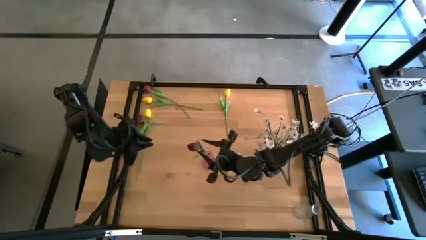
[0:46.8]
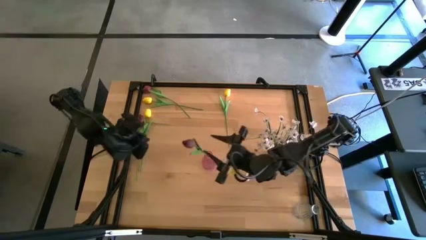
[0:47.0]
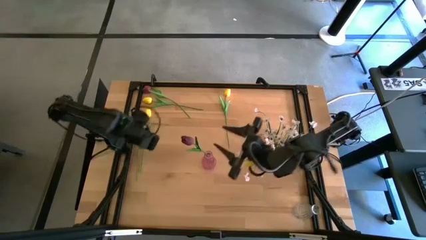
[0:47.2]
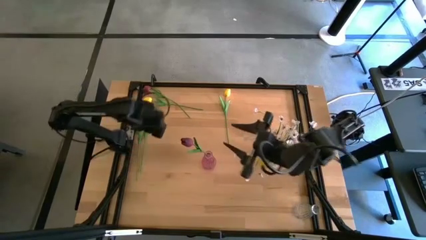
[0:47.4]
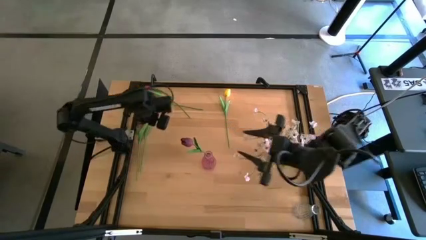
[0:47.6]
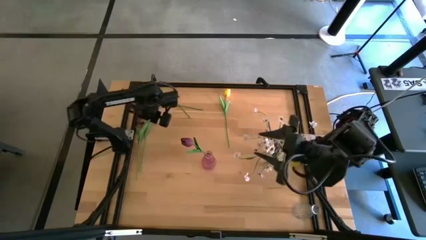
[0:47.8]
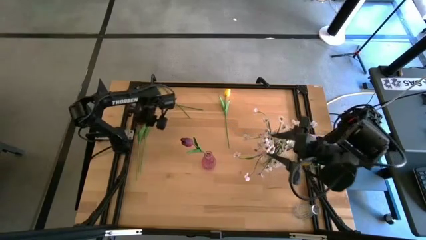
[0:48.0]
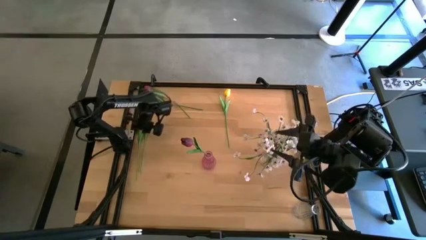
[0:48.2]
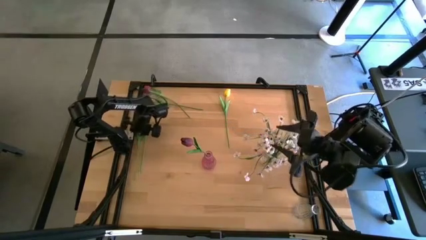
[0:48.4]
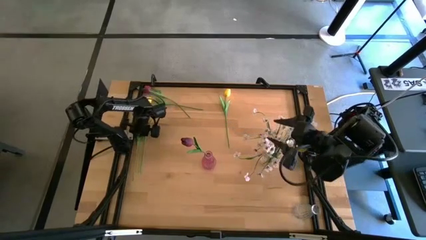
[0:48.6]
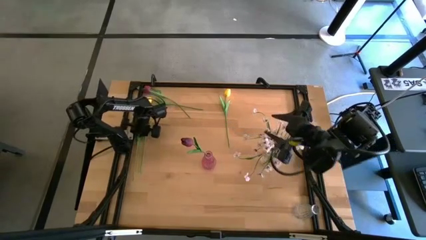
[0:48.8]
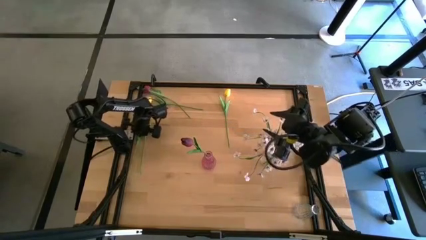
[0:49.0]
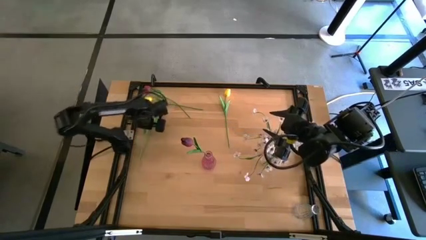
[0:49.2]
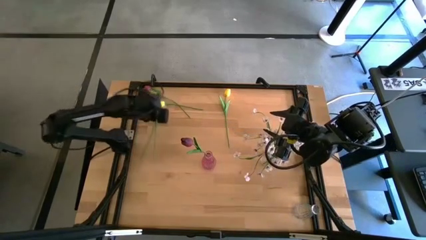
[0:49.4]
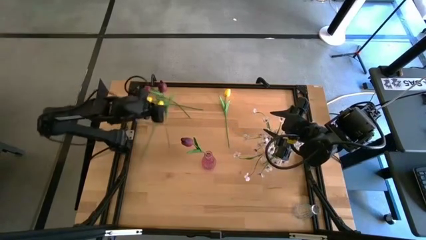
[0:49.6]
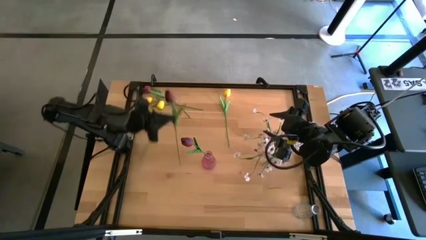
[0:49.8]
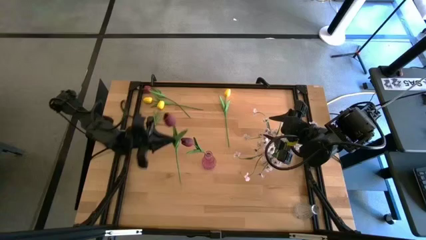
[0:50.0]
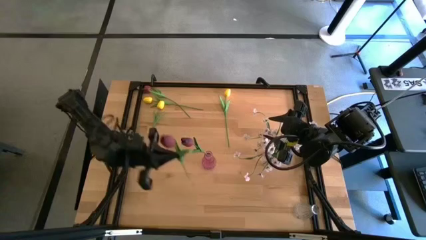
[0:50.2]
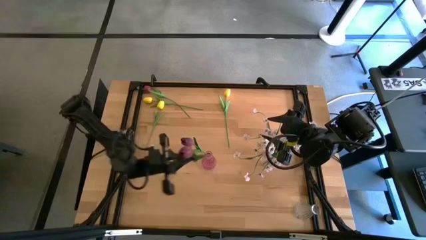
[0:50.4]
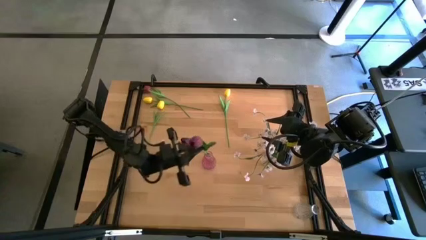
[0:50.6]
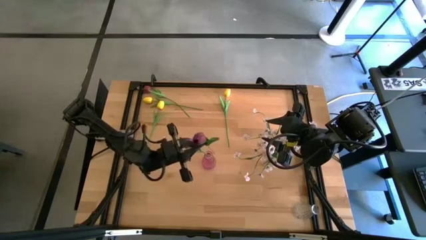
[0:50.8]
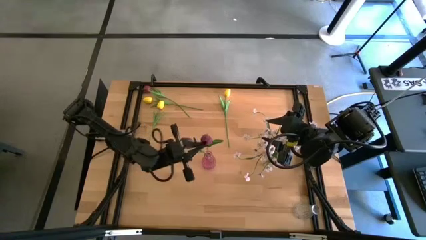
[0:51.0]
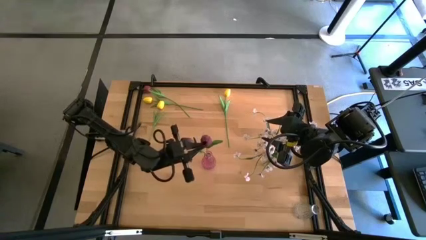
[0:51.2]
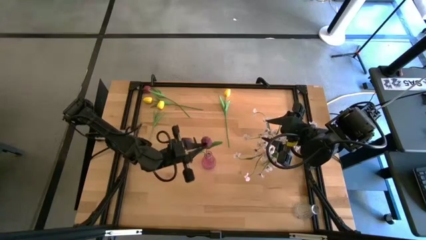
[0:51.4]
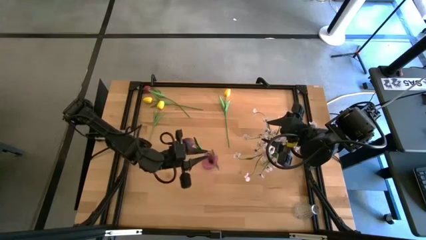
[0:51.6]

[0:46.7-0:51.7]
Task: Sort flowers into vase by color
Put the bottom red tulip into the red vase

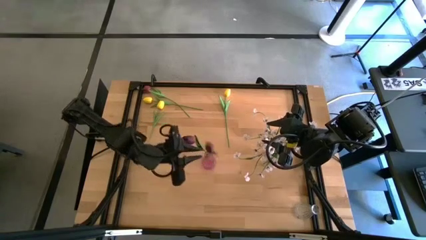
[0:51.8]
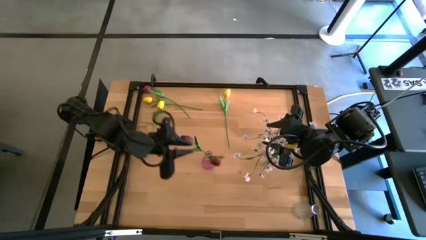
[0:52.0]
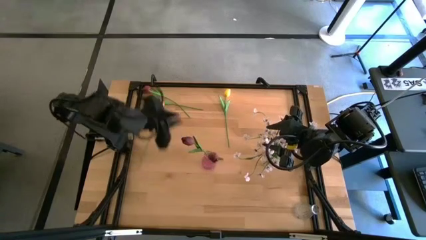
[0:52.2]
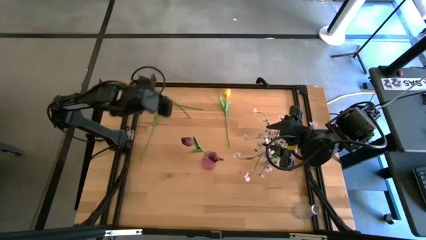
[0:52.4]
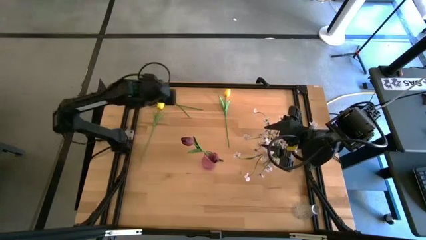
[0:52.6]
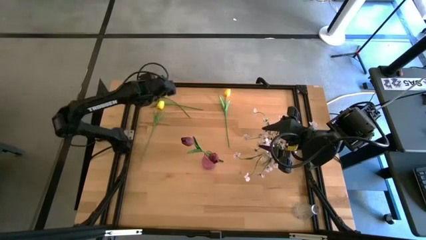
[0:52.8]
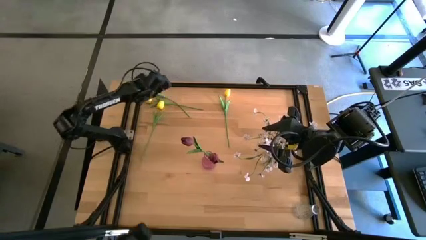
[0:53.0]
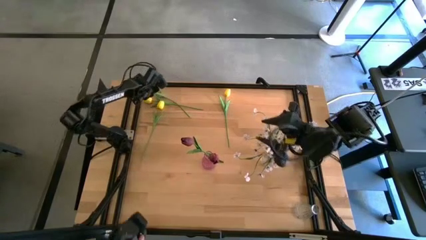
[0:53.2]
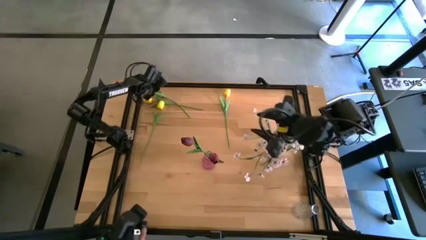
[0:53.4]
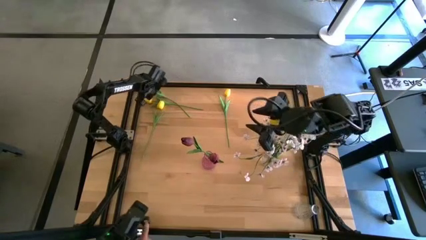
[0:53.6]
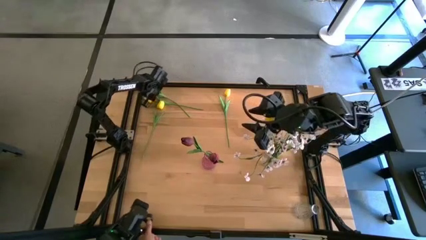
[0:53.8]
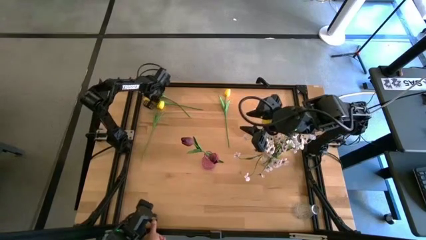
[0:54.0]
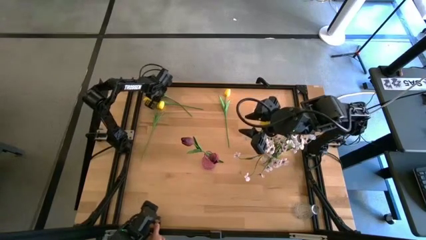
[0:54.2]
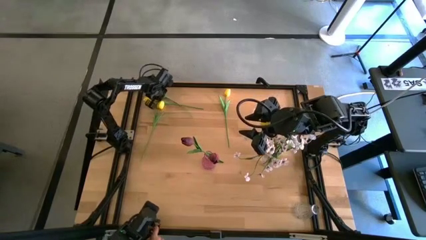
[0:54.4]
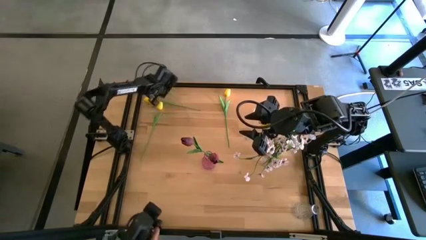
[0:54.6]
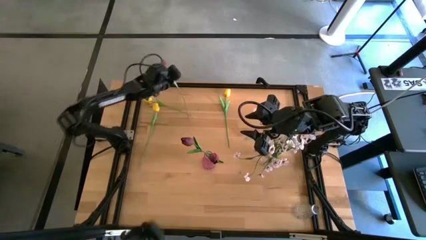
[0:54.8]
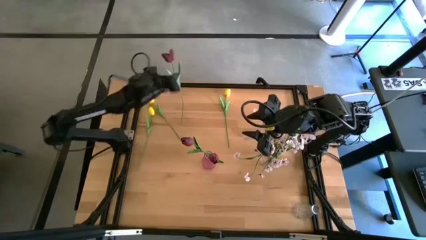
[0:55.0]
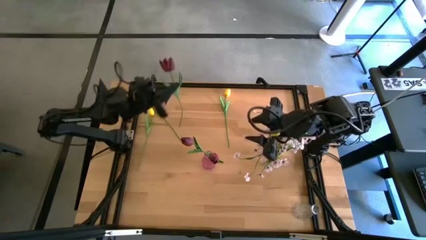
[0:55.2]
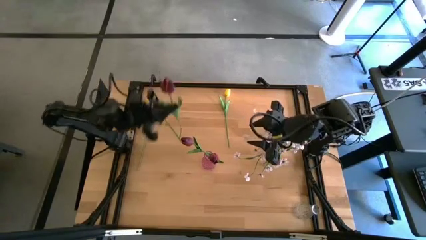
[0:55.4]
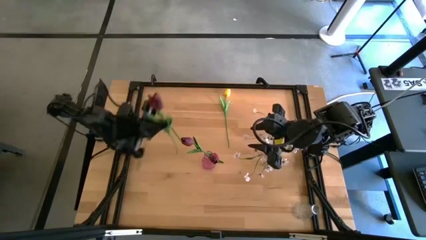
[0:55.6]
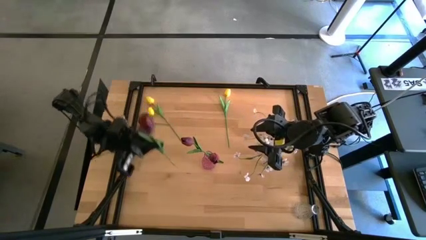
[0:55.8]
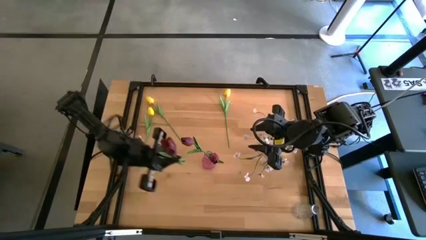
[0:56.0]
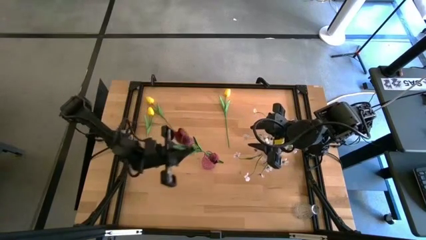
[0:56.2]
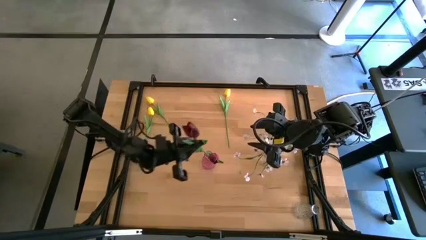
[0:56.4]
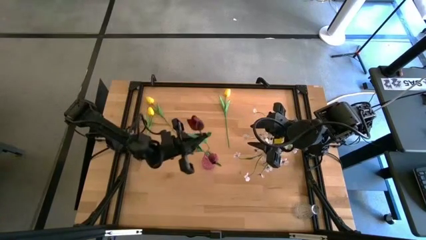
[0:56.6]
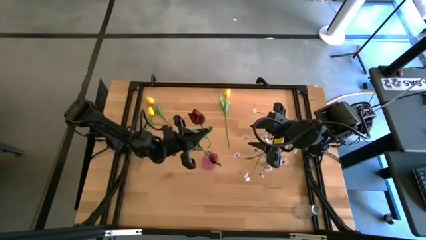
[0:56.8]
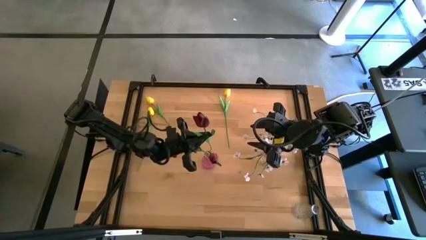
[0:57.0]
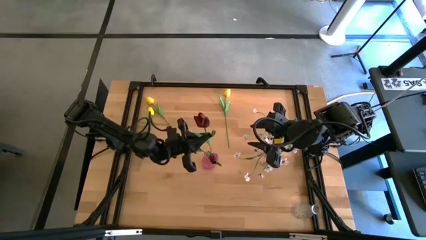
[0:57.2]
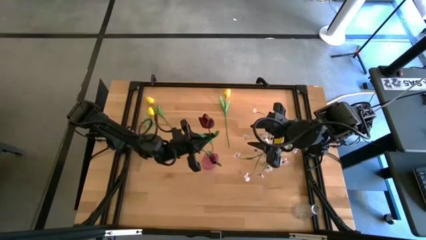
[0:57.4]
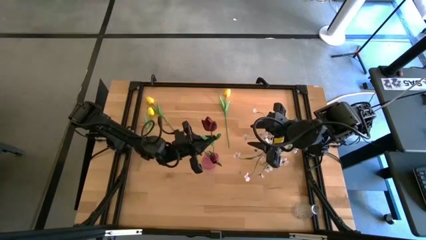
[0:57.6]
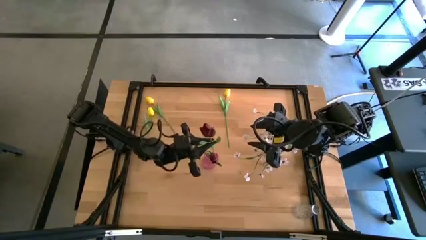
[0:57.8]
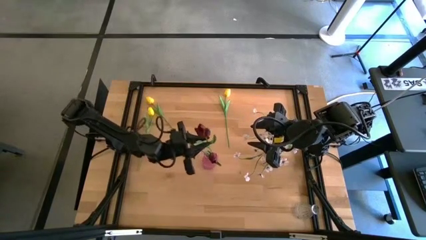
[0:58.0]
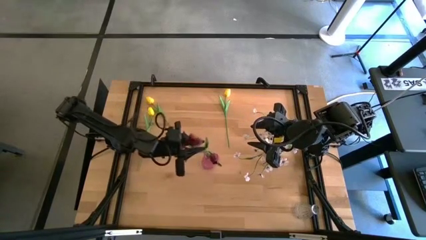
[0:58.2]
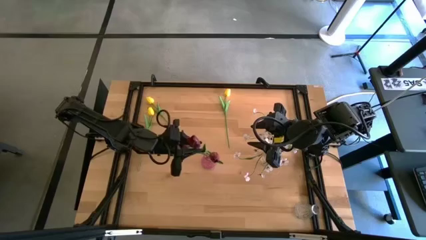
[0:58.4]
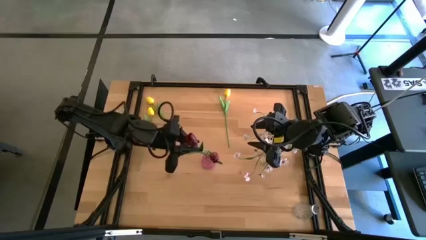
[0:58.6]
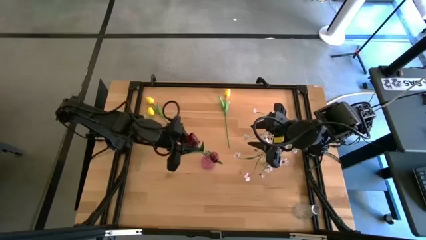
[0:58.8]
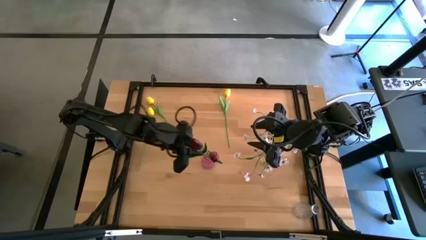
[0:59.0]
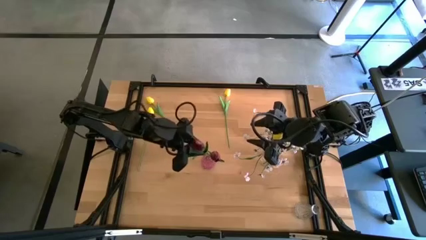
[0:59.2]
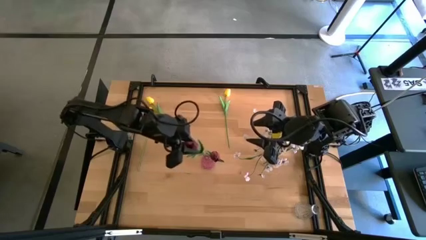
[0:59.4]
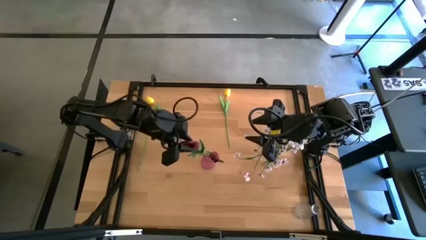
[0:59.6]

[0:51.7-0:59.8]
Put the red flower into the red vase

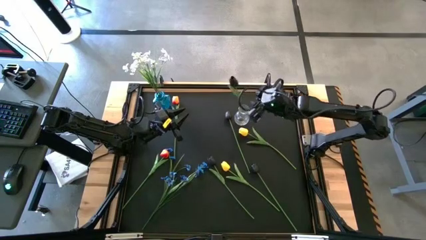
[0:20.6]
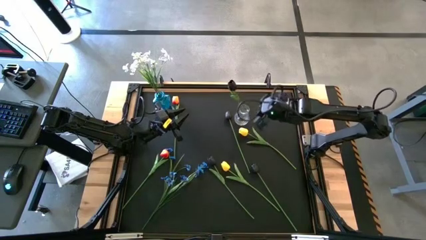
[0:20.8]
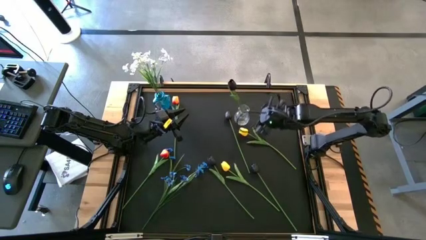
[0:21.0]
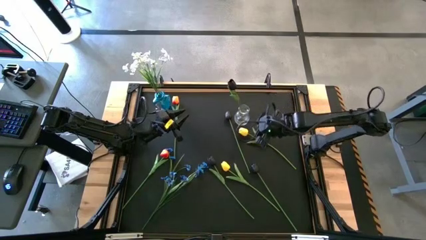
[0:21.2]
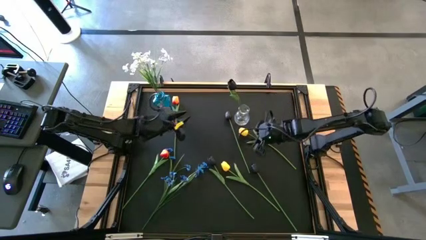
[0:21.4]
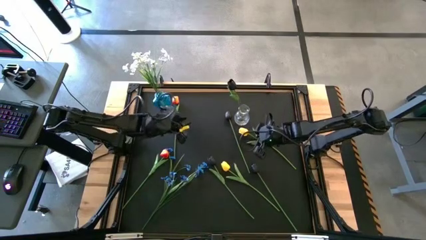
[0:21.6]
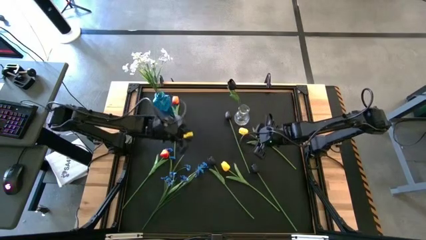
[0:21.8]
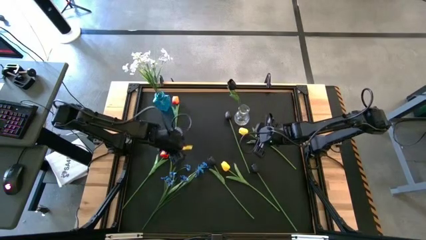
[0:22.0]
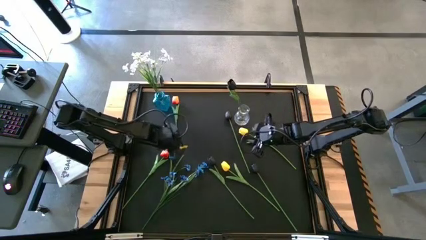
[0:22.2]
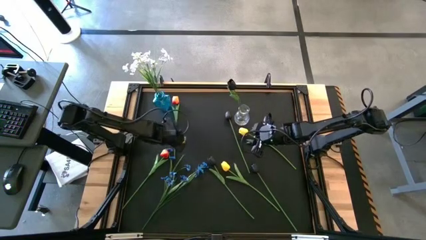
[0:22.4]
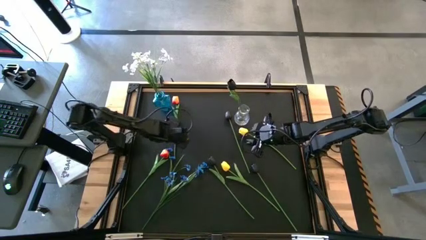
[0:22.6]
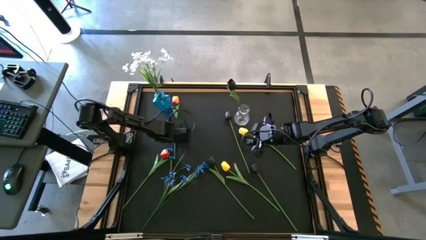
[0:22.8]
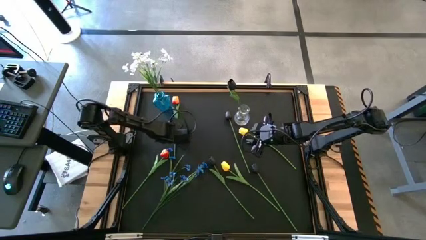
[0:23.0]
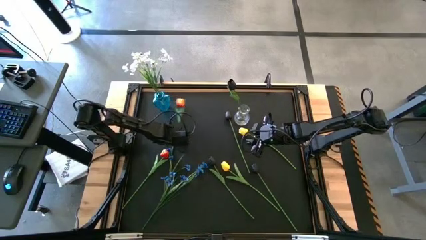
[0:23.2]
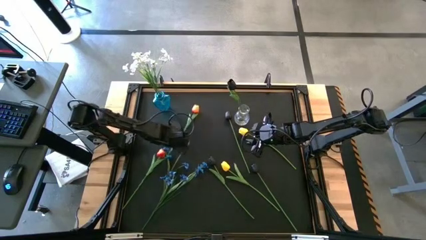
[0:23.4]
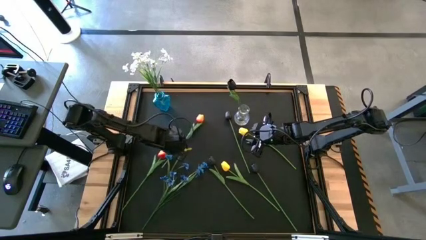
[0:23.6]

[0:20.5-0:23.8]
Task: Sort flowers into vase by color
Put the top orange flower into the blue vase
